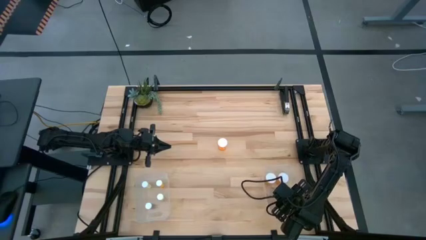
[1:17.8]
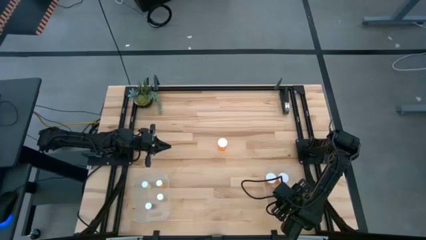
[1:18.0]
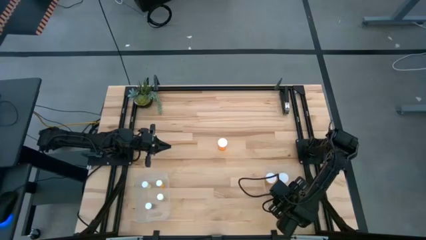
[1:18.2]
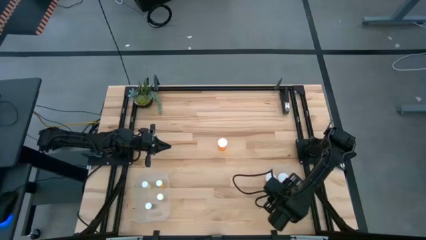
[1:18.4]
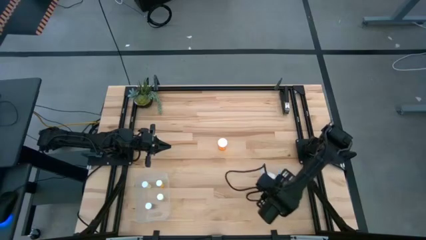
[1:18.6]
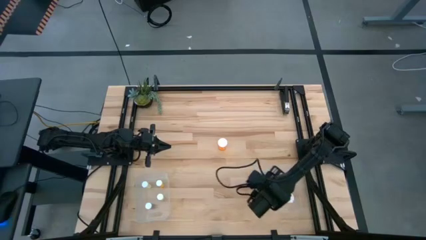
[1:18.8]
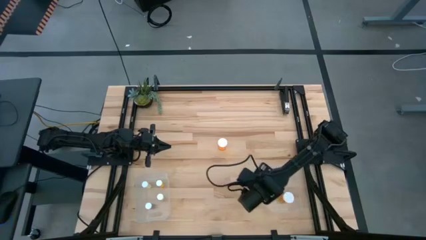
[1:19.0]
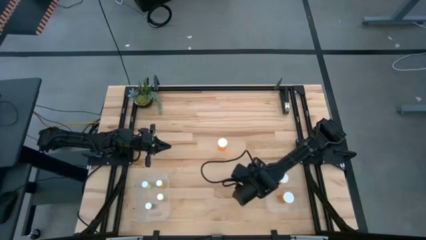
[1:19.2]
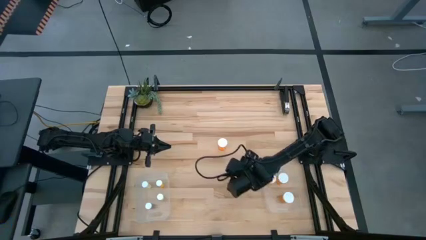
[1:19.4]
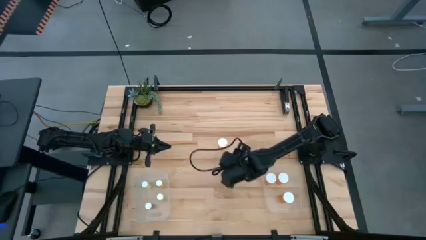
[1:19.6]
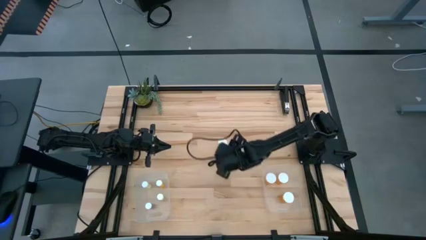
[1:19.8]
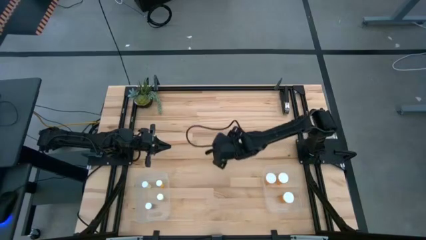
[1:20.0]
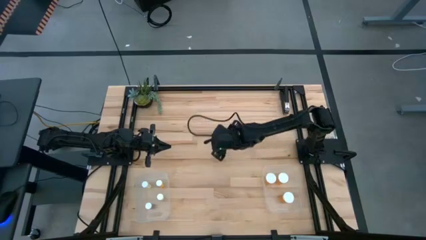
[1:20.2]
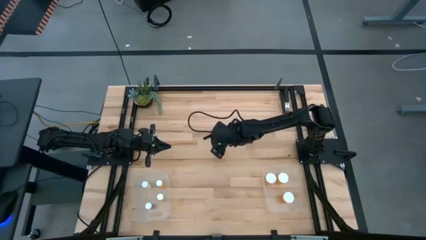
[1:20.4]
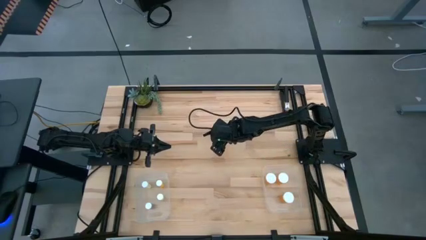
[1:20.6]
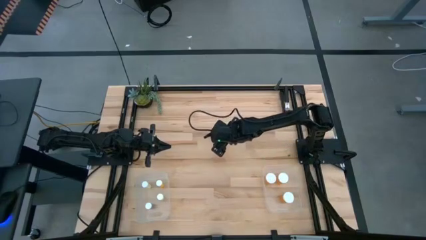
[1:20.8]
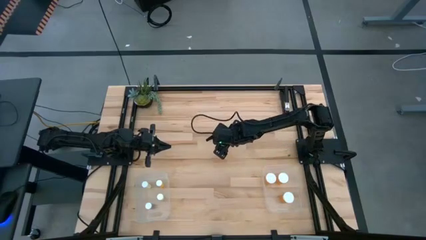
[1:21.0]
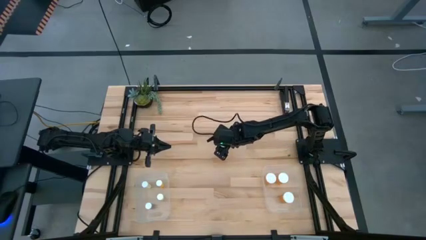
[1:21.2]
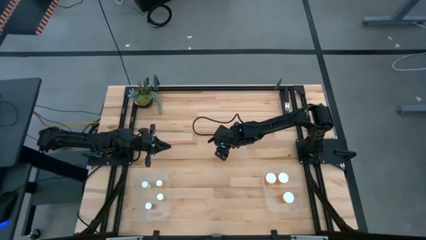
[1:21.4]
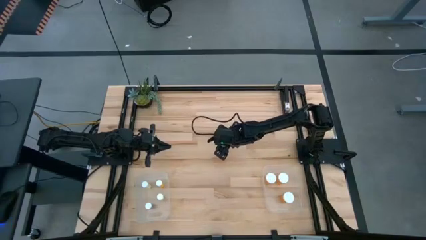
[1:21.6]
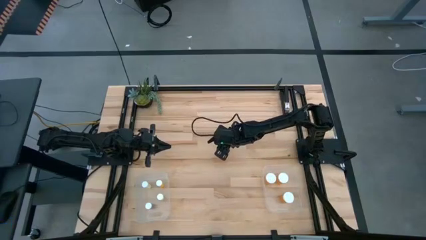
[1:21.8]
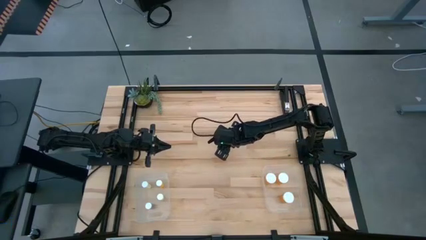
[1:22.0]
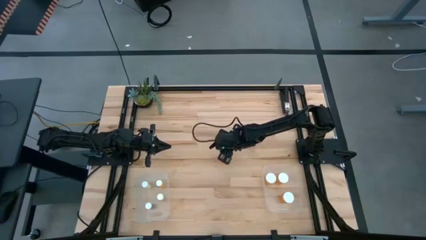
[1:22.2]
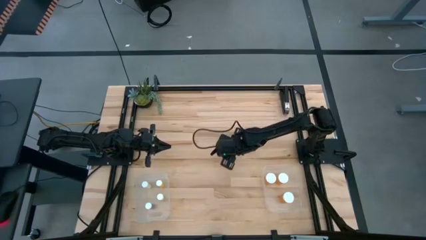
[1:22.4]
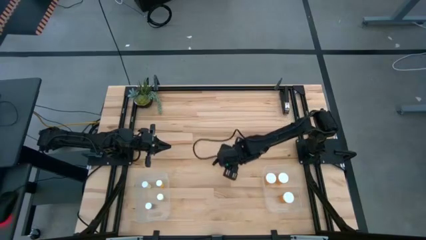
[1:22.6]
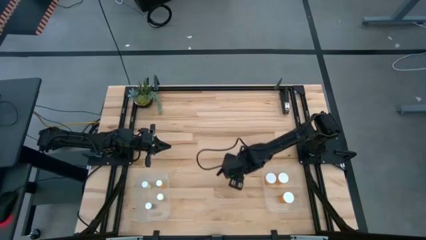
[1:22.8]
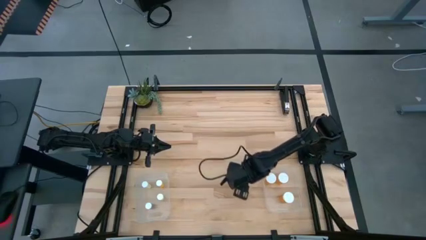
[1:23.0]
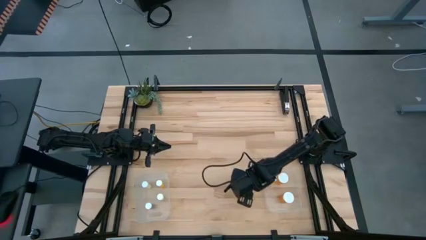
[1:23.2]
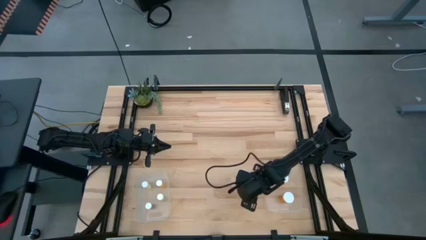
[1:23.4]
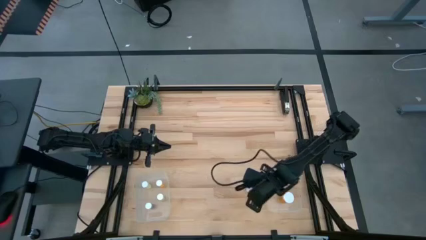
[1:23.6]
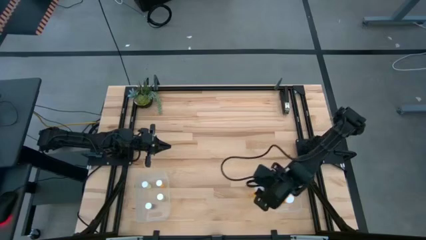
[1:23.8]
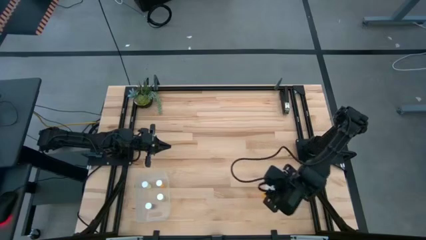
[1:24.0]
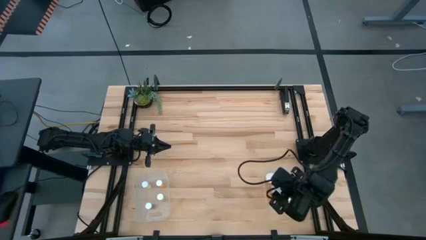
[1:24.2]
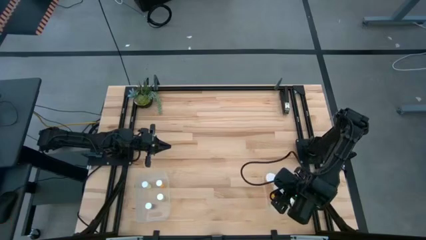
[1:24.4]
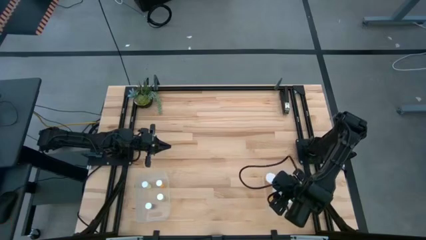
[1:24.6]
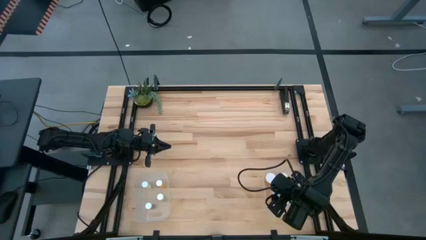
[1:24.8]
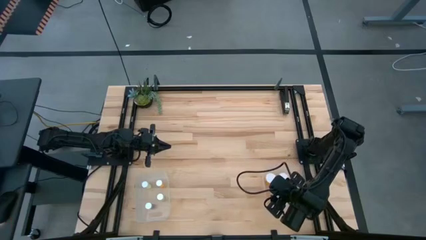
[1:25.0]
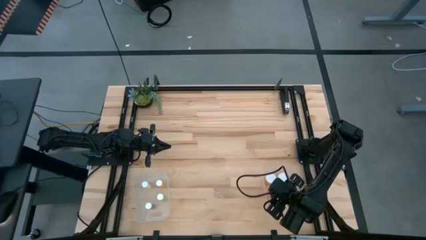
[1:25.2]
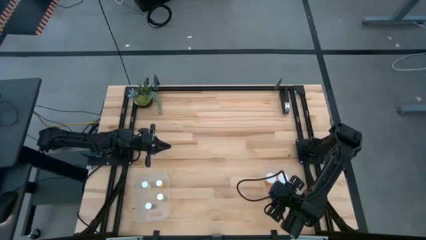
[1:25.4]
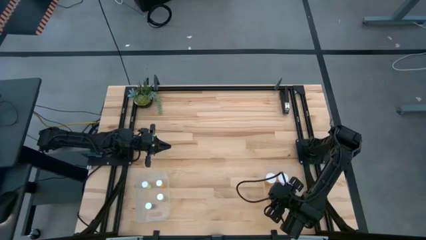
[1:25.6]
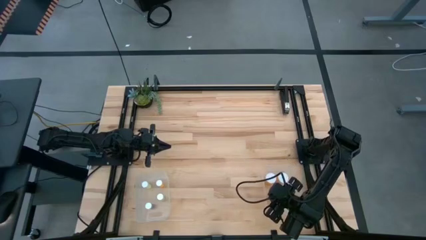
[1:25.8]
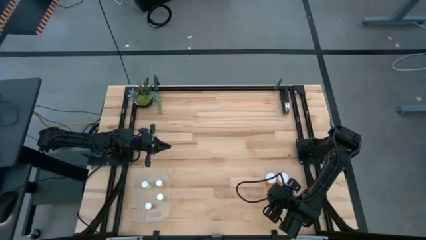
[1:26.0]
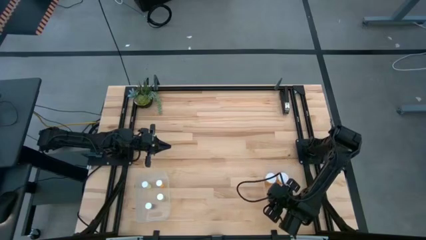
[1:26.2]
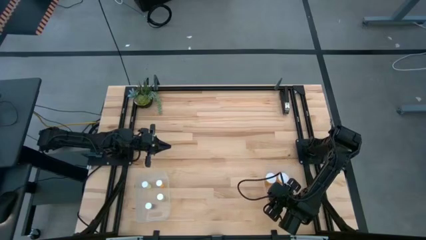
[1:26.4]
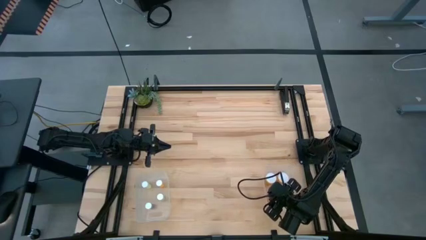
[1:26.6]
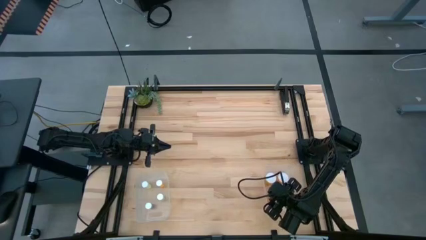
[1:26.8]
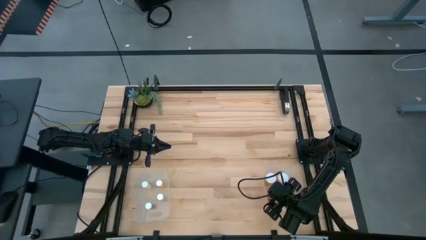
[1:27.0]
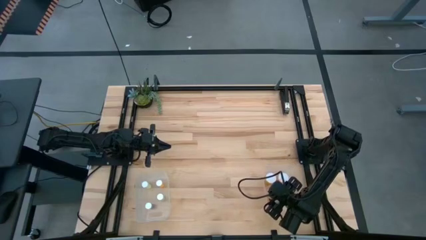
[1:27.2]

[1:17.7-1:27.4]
Task: Pick and place medicine bottles into bin by pill shape (circle, oval)
Put the big orange pill bottle into the right transparent bin

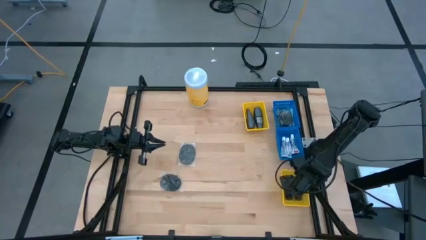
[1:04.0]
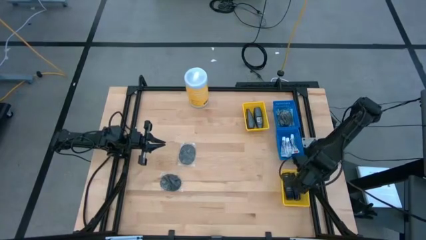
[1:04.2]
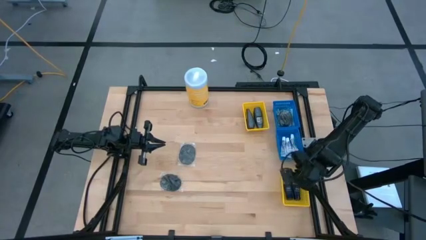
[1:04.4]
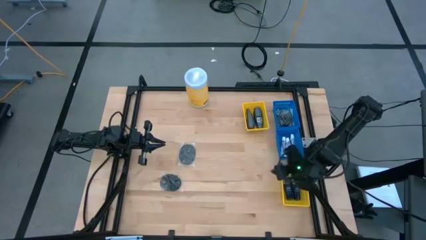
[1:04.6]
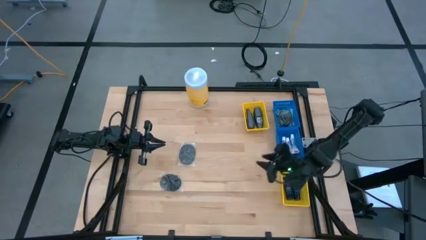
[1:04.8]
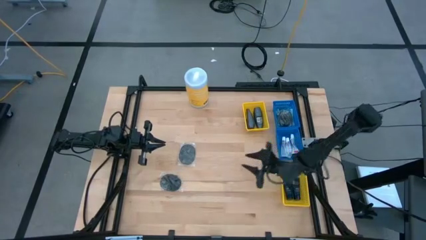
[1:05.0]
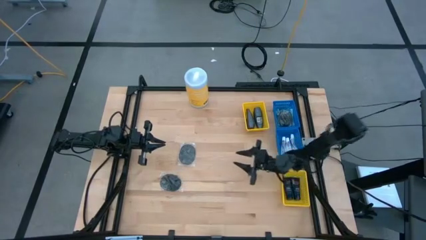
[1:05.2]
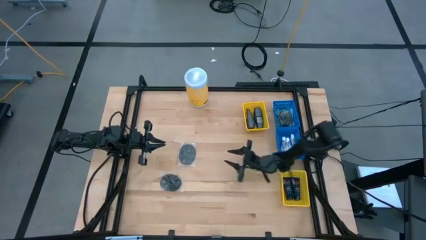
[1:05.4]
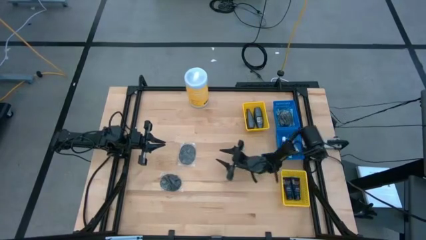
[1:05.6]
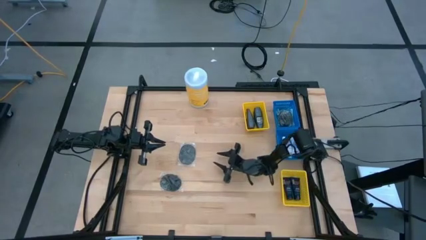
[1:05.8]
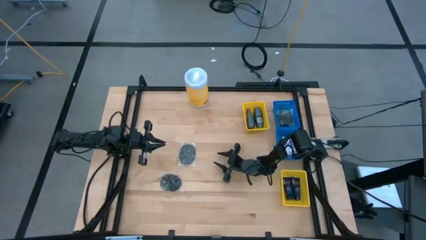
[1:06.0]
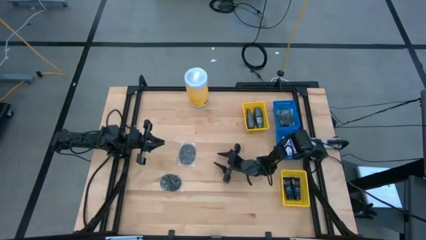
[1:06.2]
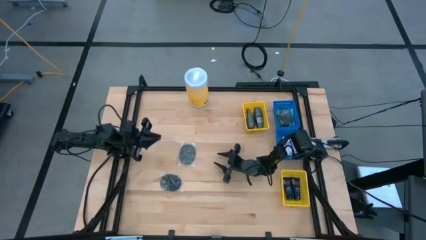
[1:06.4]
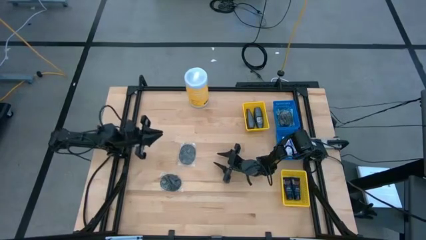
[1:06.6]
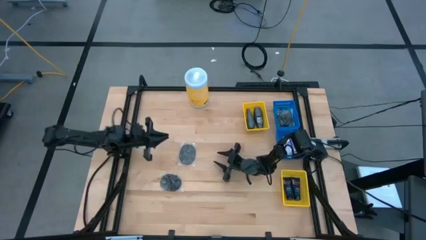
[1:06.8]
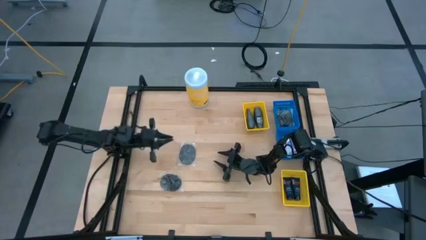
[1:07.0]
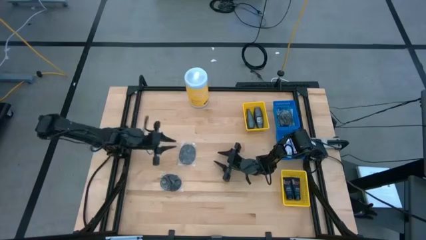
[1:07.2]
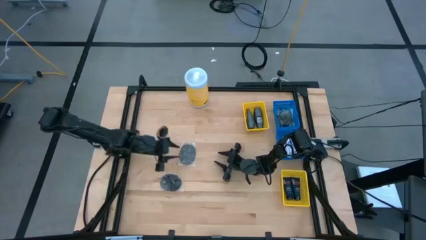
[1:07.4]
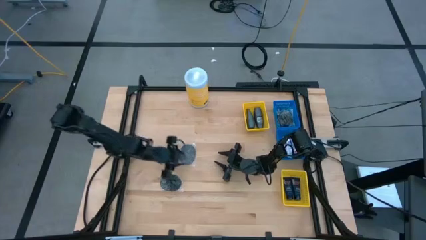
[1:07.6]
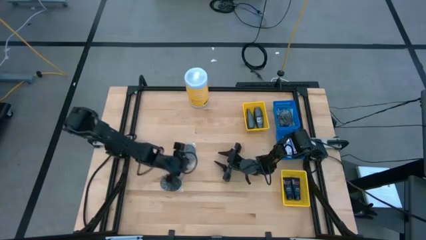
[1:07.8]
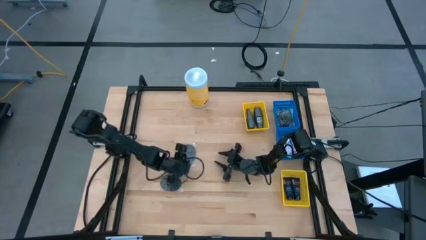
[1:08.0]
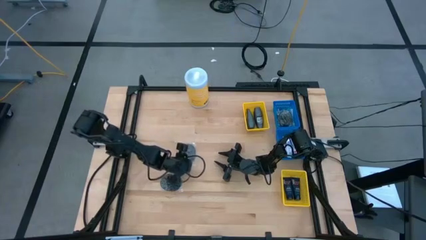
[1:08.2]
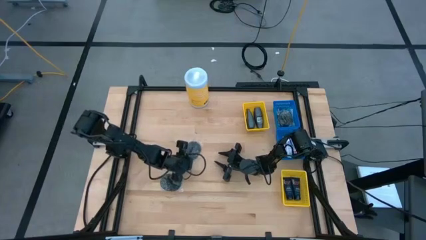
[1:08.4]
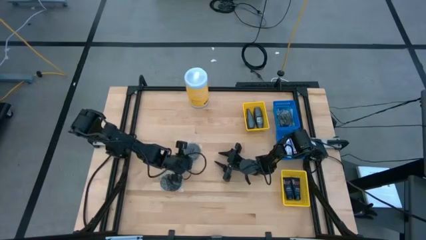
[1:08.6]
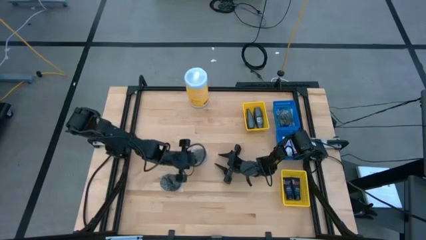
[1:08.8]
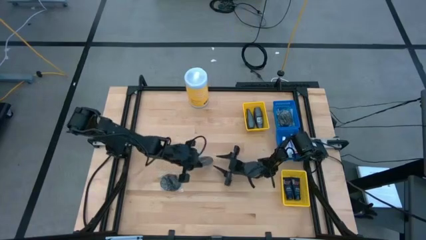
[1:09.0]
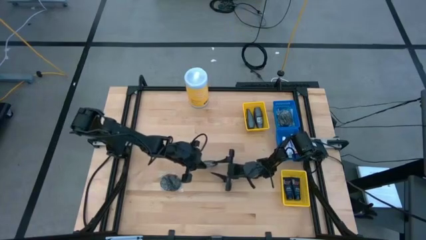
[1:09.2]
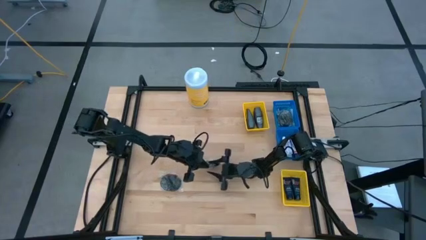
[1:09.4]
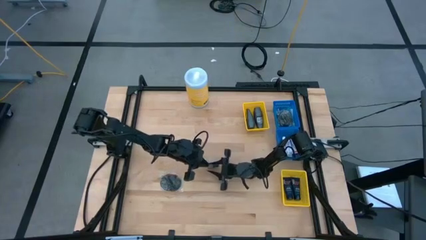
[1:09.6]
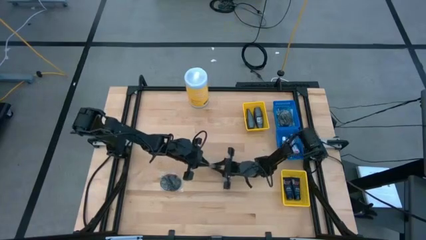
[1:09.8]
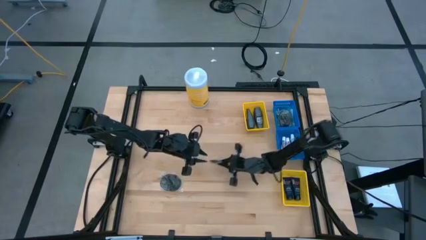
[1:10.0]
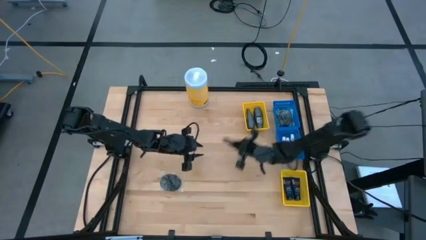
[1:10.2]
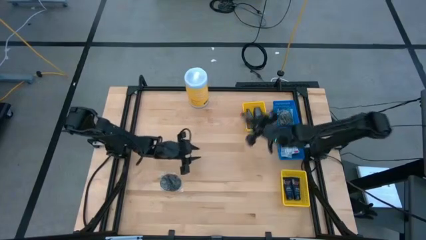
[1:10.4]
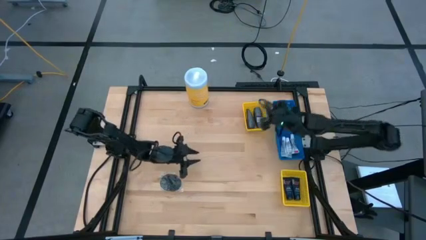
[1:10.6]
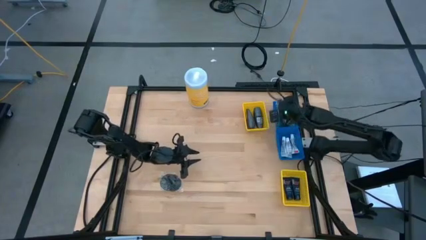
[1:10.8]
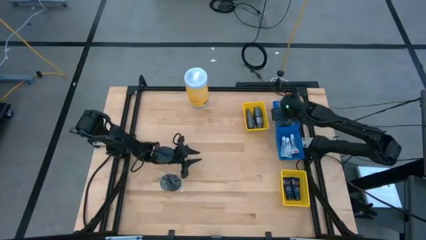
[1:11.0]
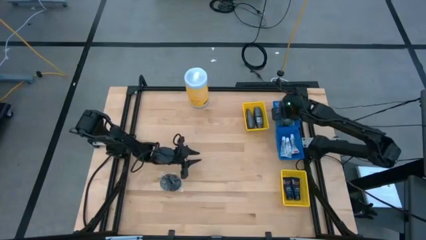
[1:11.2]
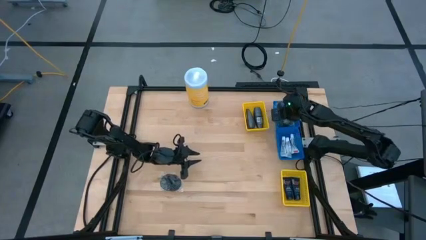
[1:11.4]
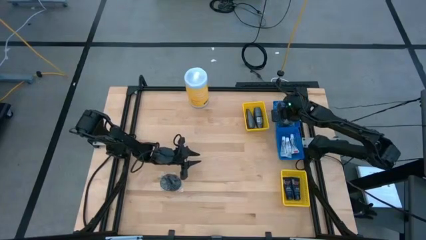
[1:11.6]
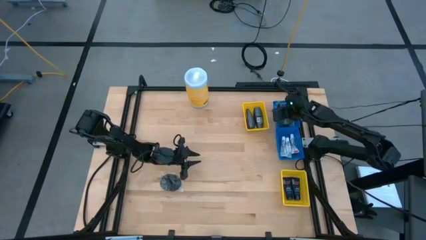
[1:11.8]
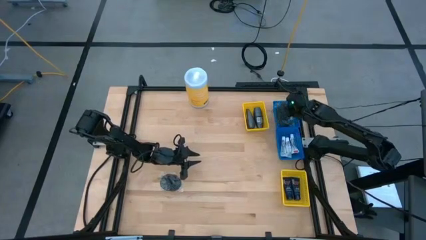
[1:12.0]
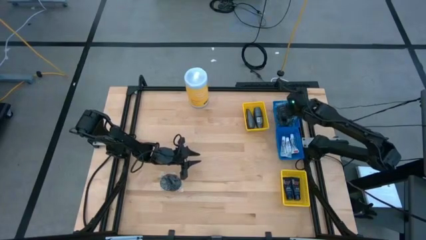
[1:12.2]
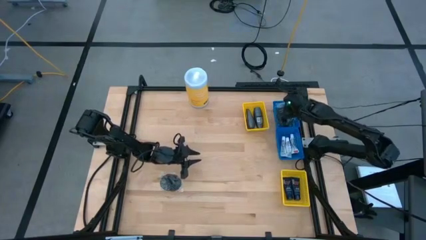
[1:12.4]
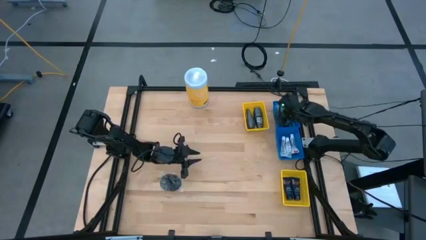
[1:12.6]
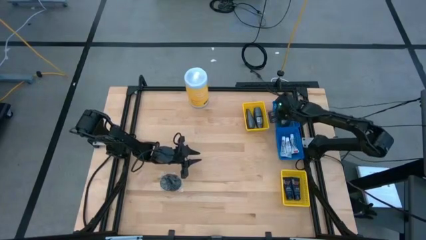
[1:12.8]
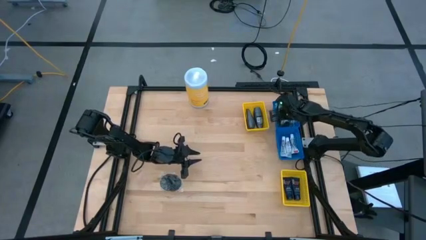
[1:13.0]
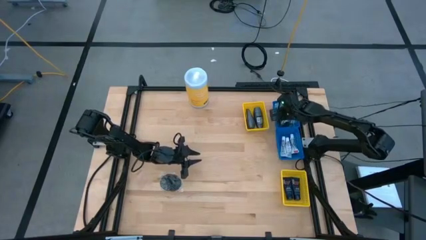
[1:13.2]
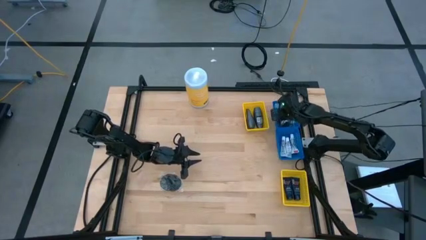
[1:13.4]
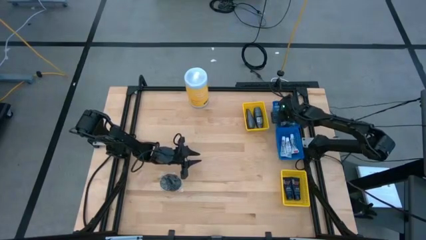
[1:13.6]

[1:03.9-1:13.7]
Task: Pick & Place Travel size toiletries
Put the top black hairbrush into the top blue basket
